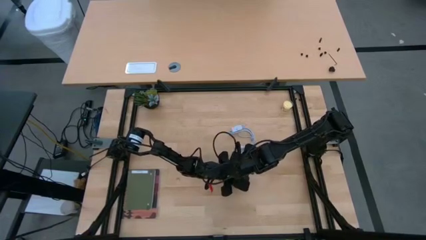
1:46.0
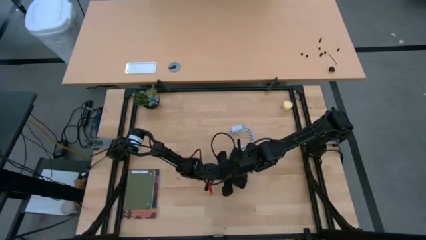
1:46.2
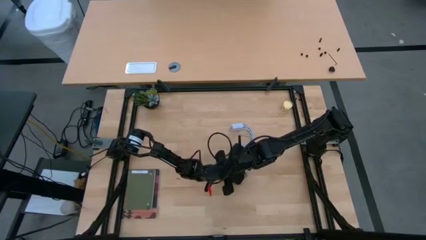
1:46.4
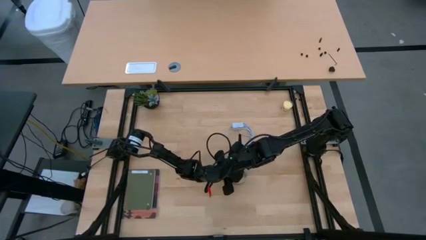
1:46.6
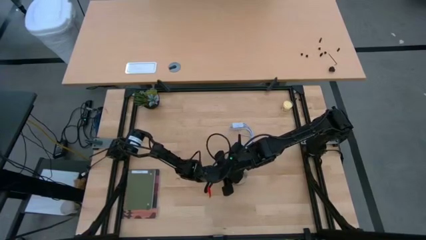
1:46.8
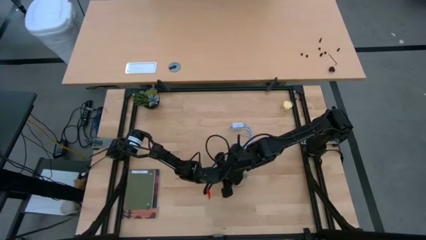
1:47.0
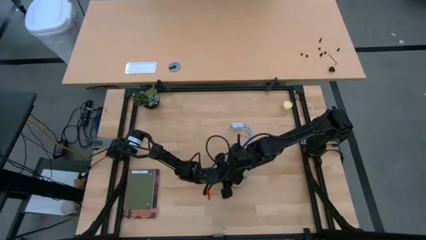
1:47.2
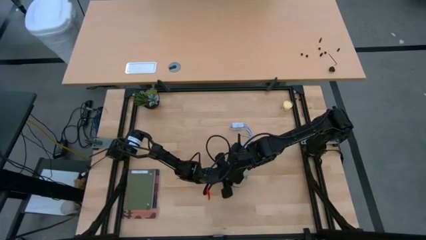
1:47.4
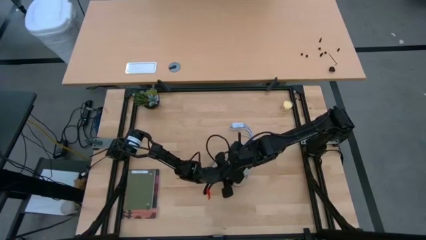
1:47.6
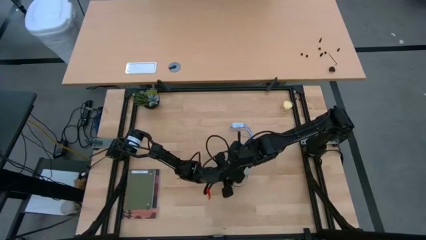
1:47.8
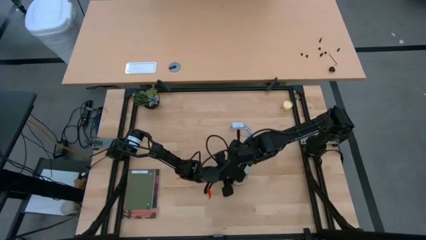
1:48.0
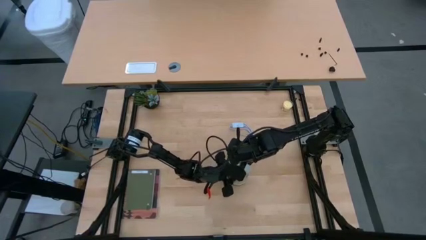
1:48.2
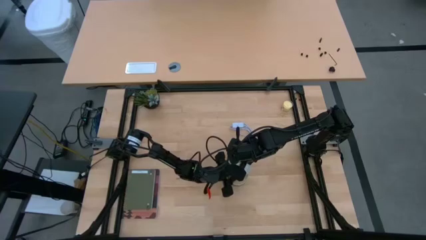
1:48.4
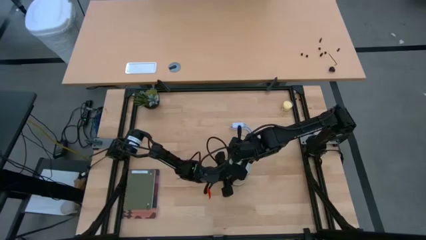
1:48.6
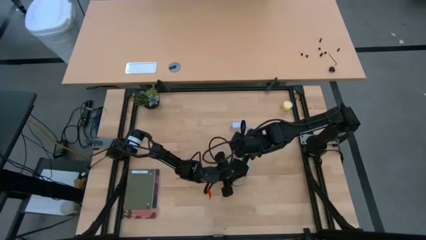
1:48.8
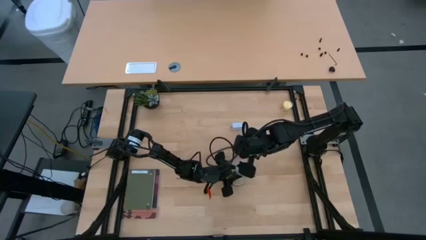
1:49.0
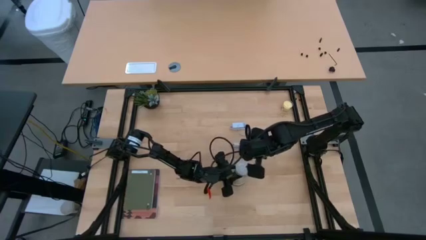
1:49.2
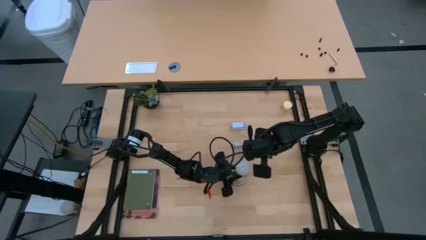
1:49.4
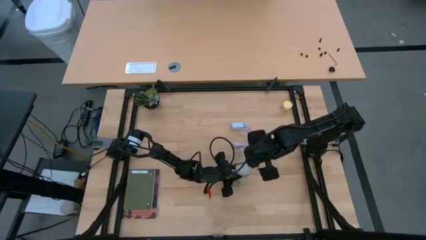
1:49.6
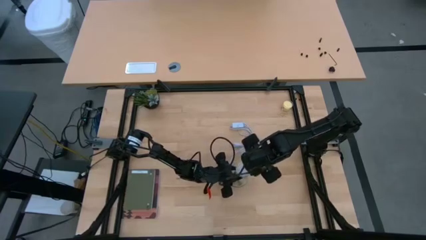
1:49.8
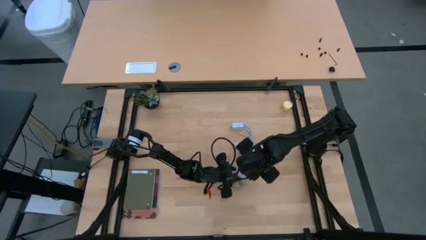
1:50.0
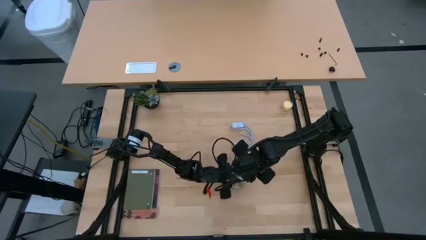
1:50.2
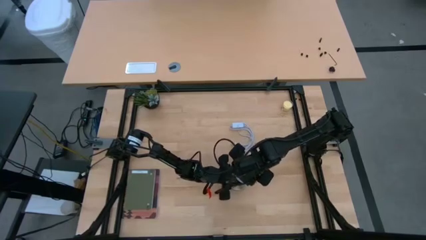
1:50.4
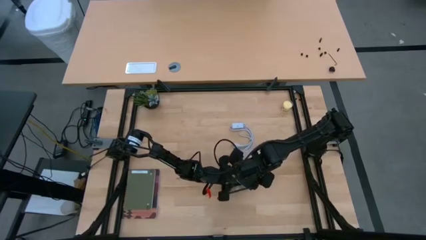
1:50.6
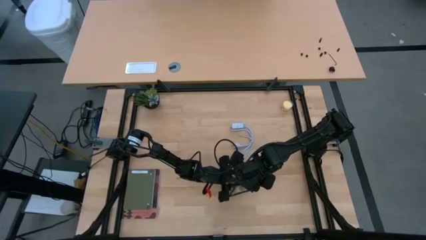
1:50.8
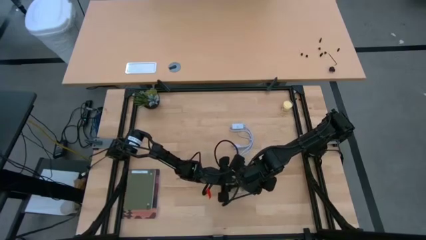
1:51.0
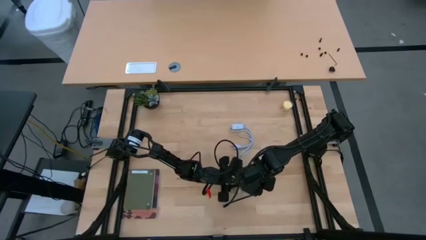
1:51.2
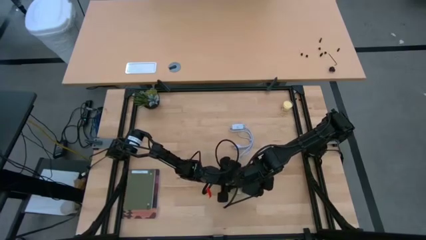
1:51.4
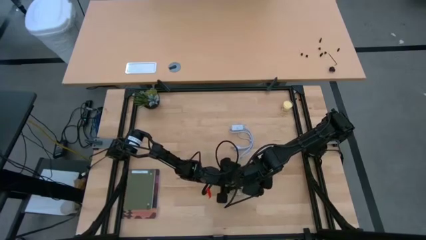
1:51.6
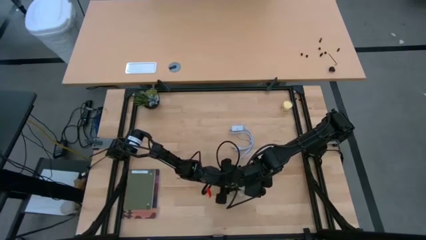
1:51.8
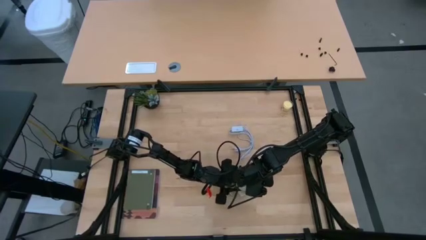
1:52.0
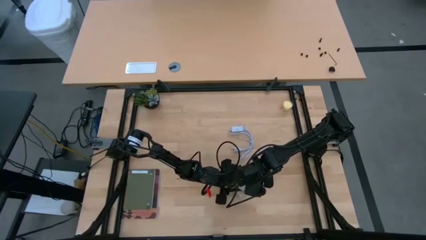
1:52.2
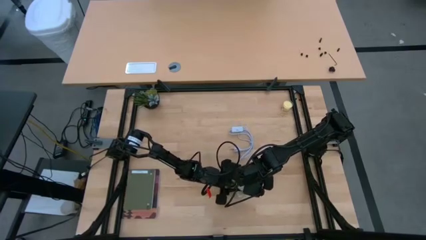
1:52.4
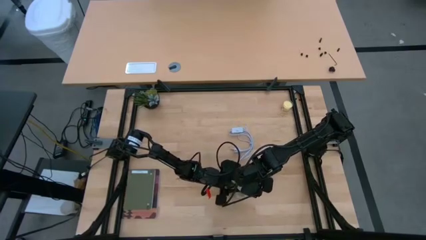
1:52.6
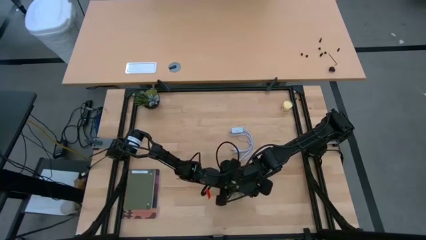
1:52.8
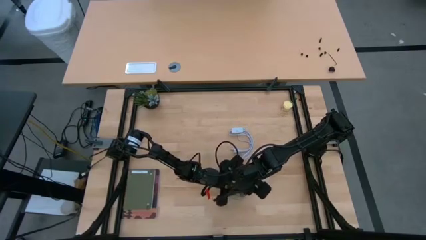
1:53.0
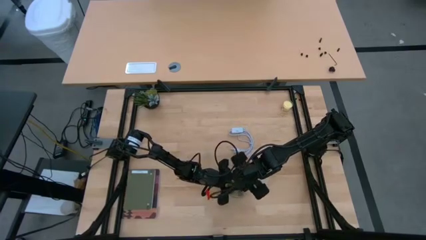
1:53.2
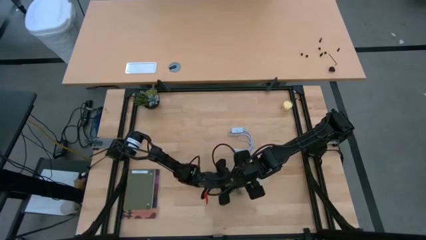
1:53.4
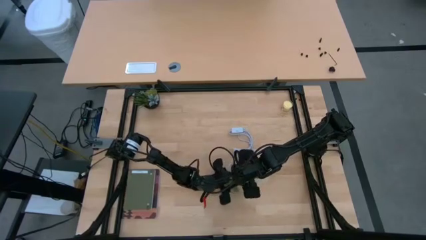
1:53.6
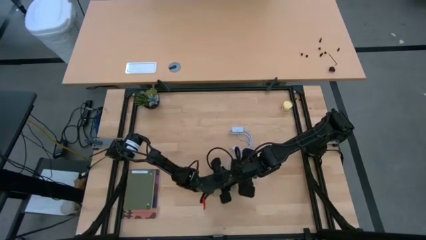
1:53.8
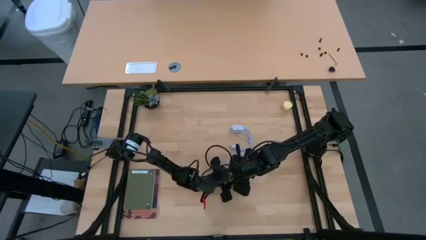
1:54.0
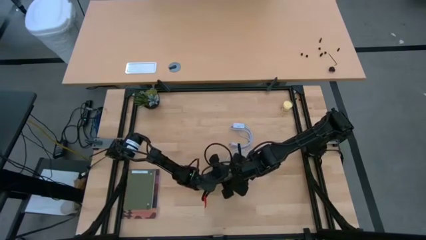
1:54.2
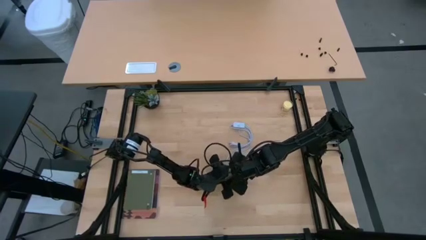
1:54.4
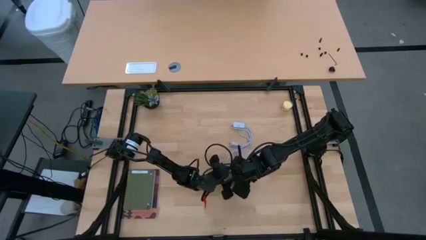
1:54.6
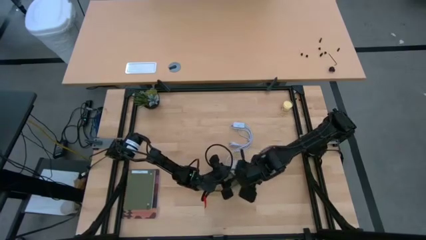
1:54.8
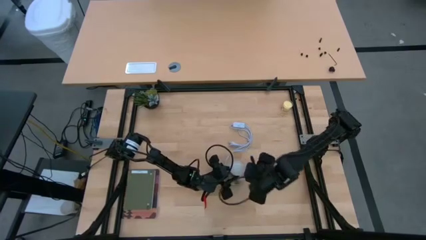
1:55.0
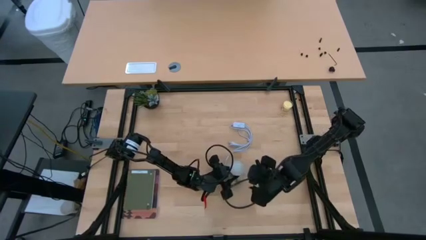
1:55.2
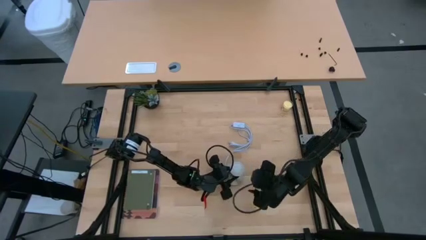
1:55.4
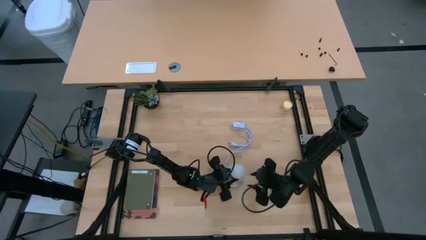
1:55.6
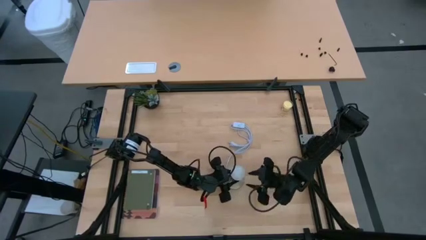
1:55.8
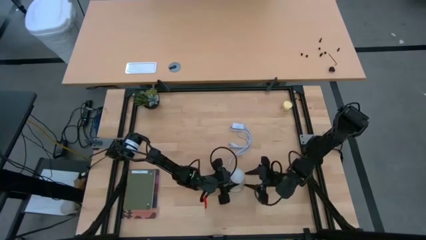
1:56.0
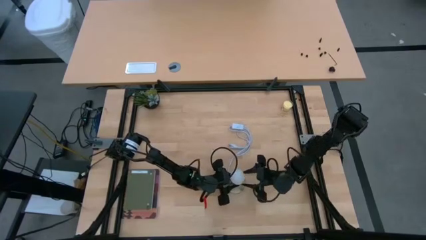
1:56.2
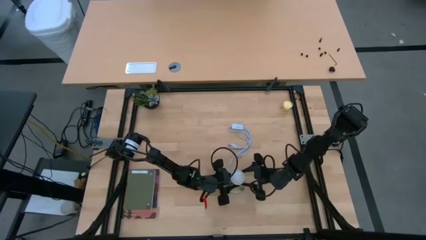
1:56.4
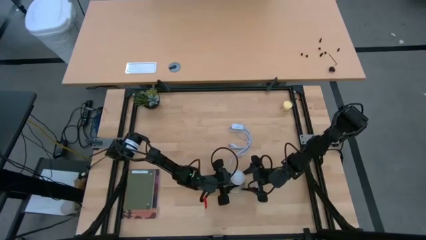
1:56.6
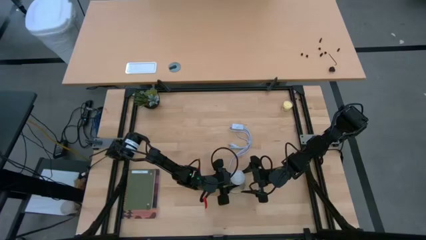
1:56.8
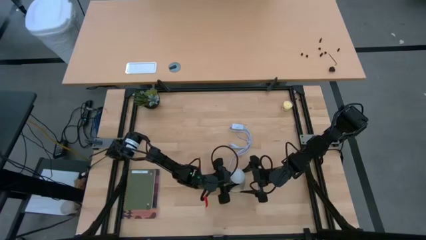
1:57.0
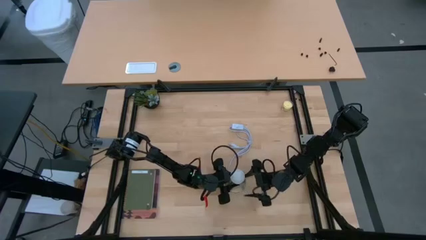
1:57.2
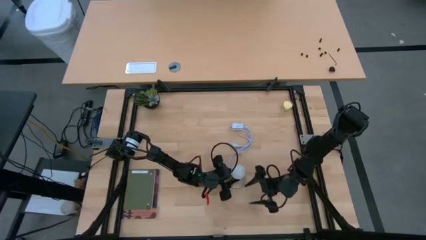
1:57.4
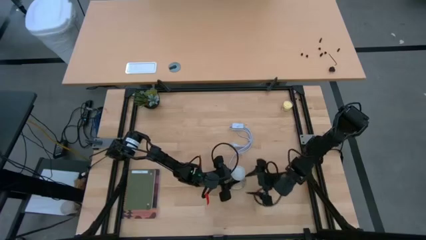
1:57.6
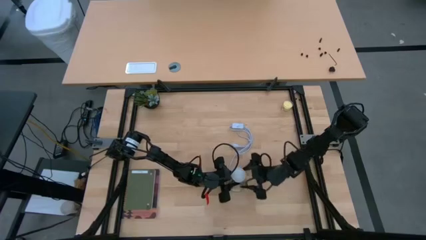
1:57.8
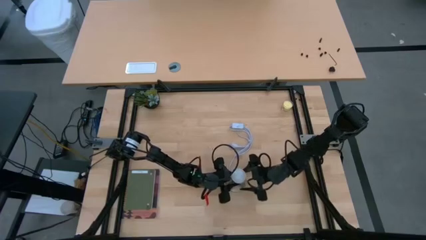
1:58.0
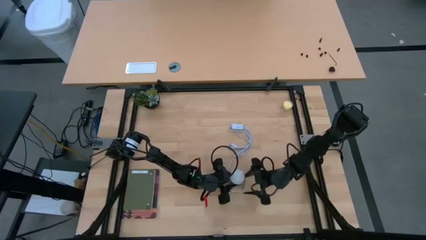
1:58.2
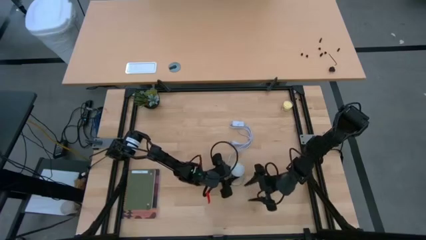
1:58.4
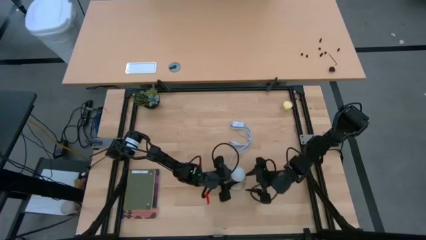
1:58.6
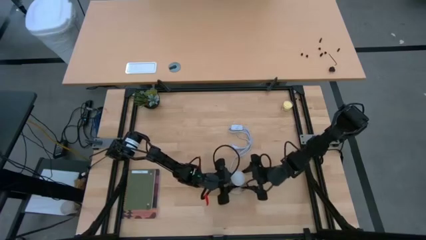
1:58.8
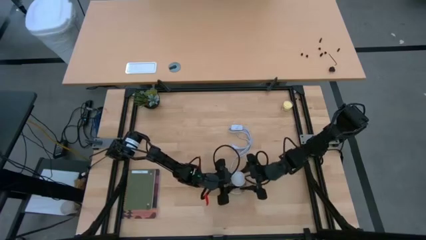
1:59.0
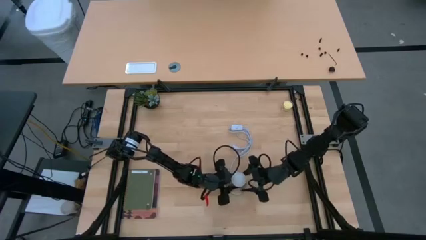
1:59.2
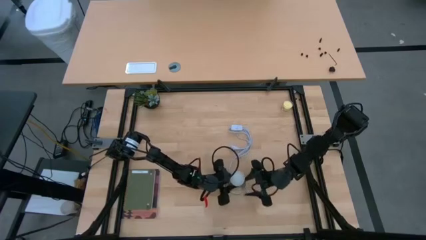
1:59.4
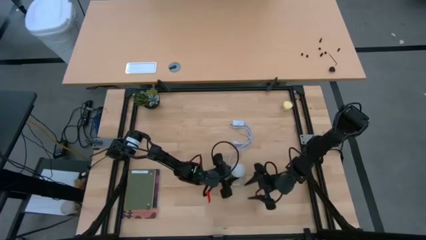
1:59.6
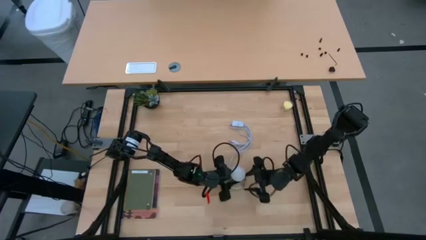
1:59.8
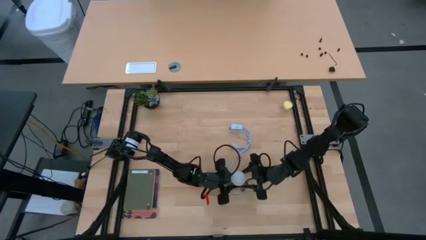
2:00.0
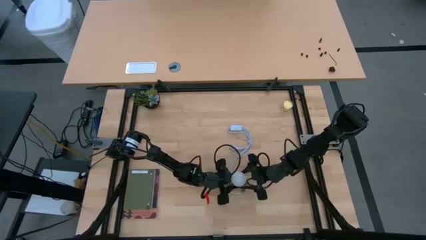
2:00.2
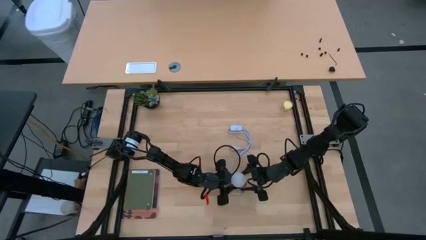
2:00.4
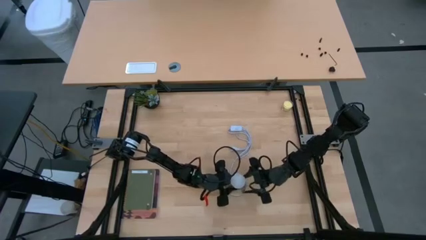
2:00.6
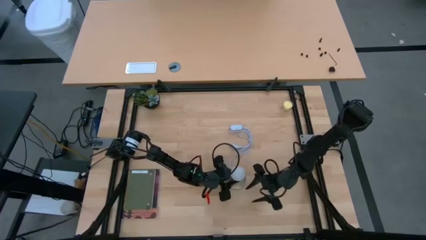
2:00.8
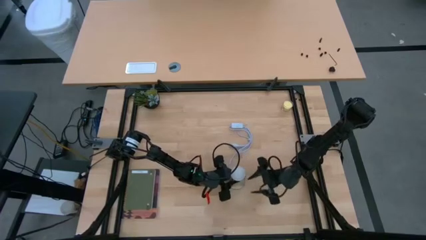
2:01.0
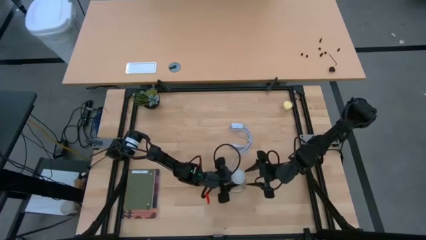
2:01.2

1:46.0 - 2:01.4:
Task: Screw lightbulb
Insert the lightbulb into the lamp
